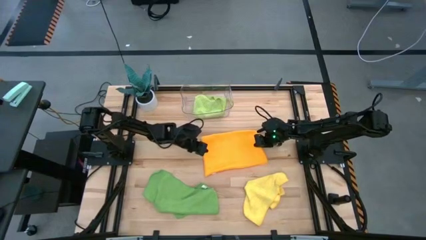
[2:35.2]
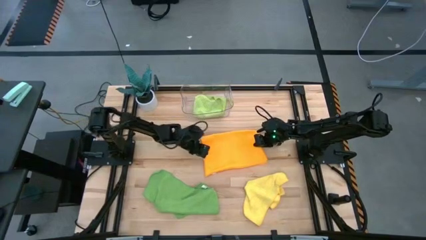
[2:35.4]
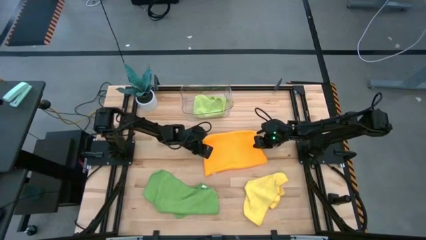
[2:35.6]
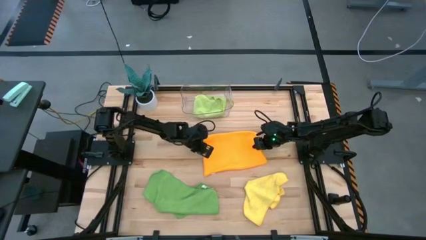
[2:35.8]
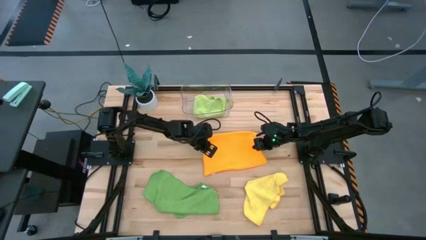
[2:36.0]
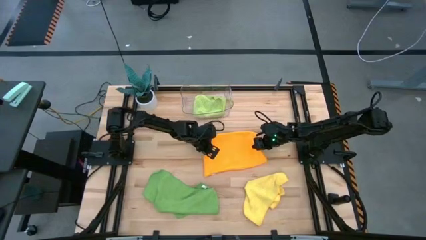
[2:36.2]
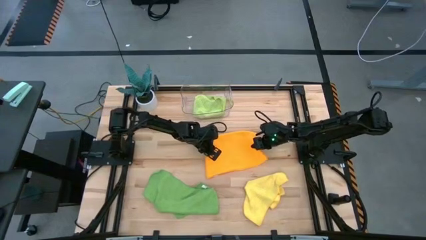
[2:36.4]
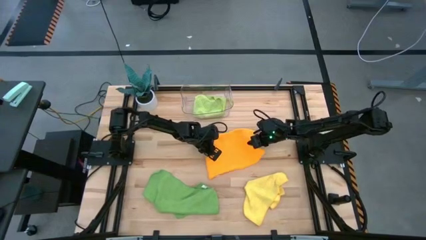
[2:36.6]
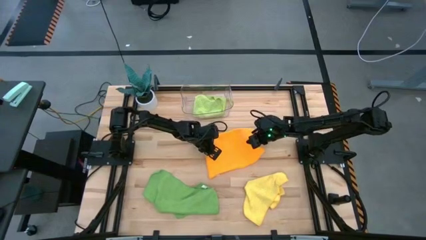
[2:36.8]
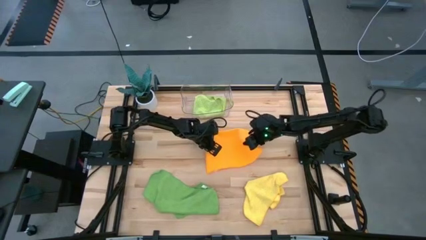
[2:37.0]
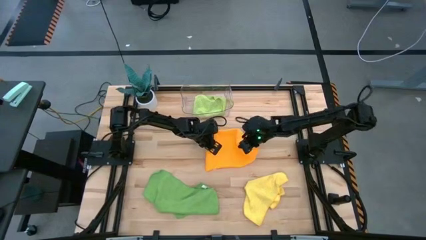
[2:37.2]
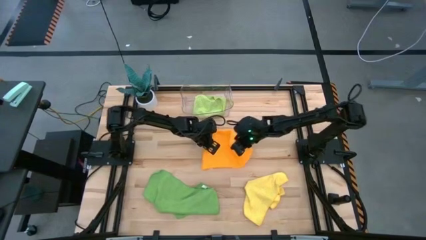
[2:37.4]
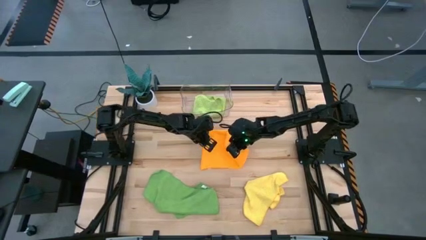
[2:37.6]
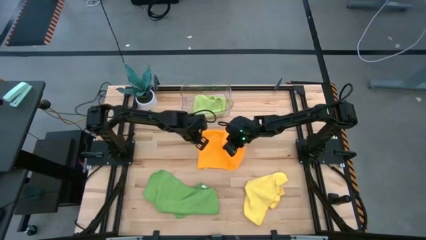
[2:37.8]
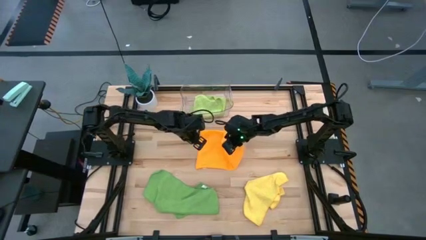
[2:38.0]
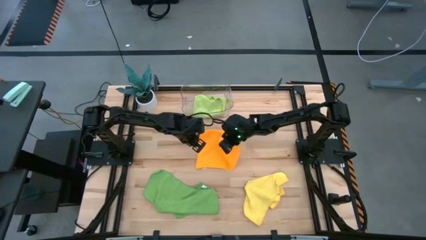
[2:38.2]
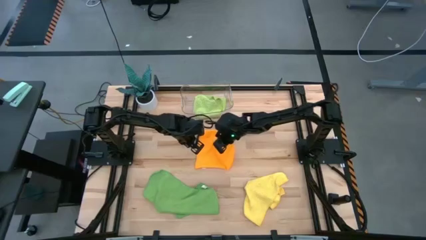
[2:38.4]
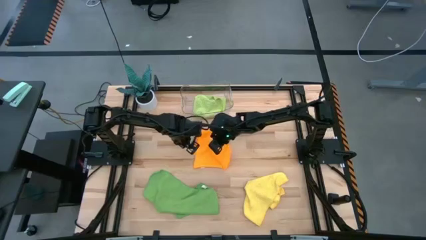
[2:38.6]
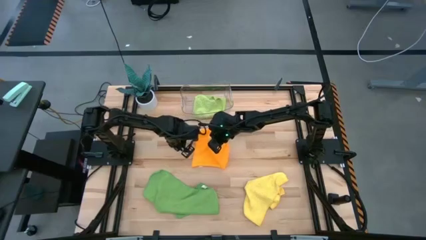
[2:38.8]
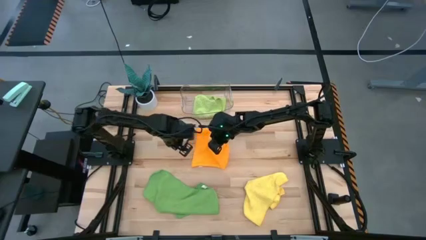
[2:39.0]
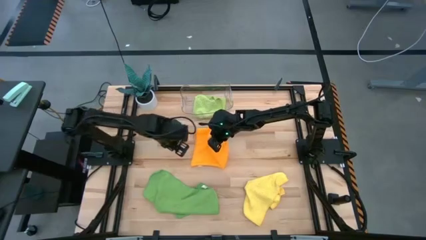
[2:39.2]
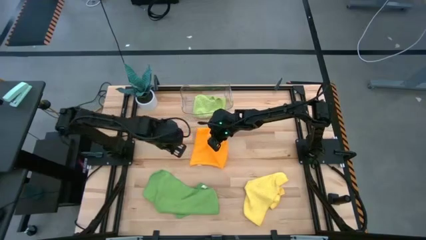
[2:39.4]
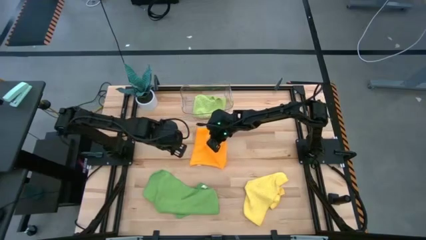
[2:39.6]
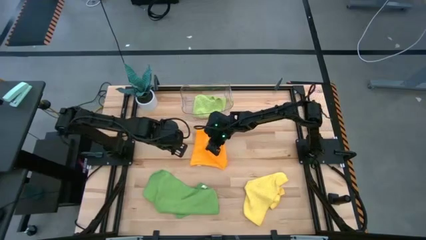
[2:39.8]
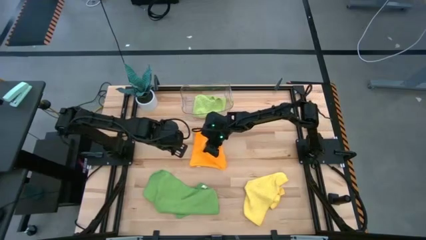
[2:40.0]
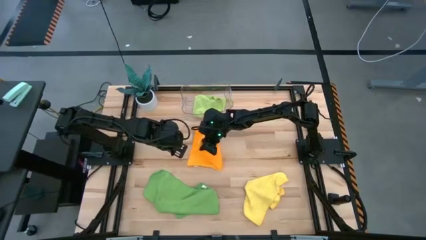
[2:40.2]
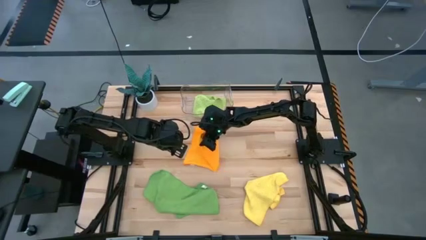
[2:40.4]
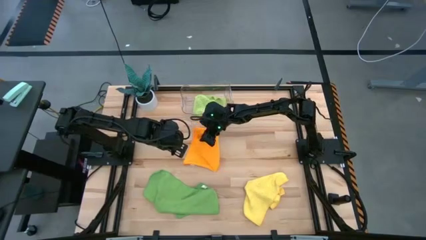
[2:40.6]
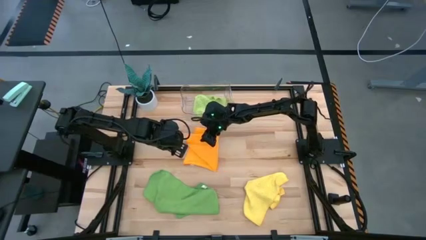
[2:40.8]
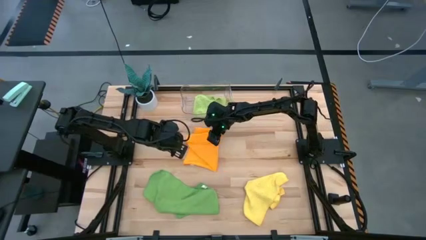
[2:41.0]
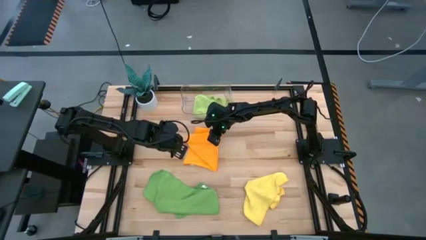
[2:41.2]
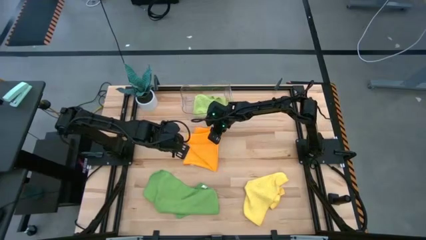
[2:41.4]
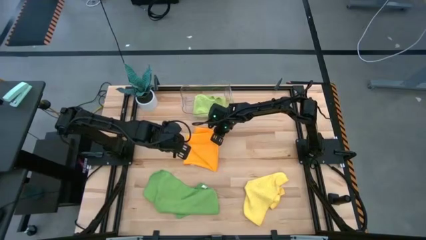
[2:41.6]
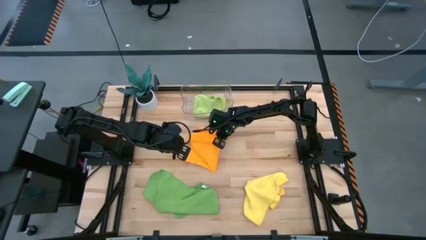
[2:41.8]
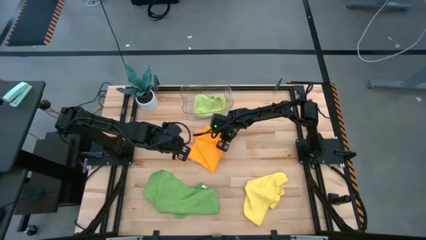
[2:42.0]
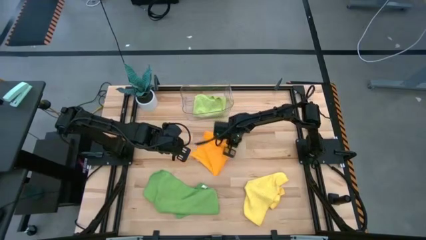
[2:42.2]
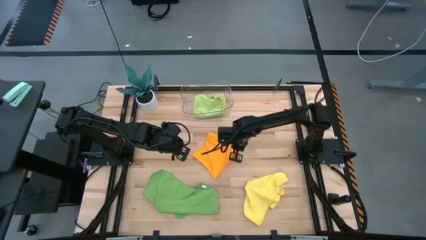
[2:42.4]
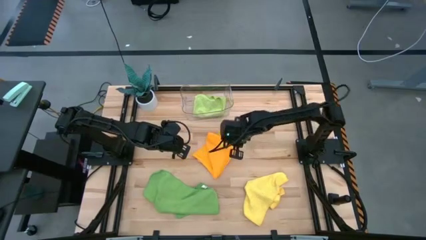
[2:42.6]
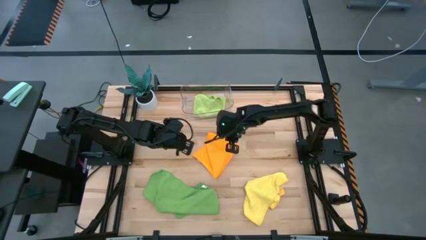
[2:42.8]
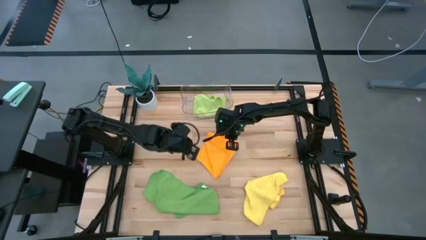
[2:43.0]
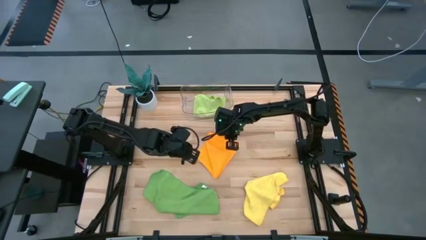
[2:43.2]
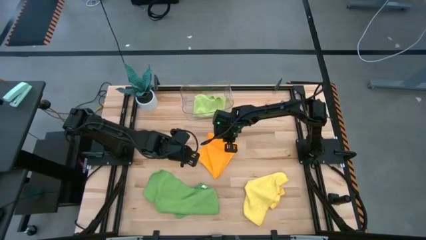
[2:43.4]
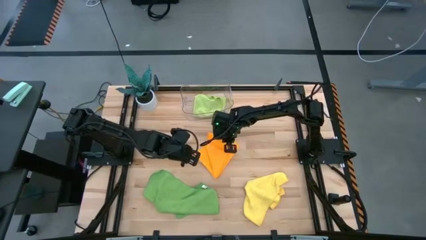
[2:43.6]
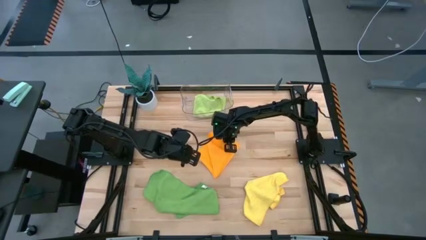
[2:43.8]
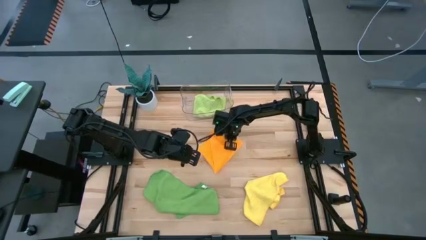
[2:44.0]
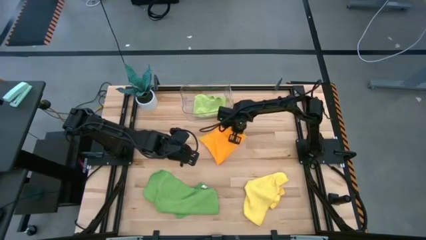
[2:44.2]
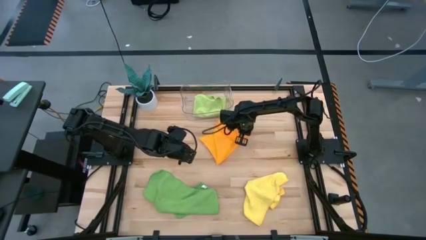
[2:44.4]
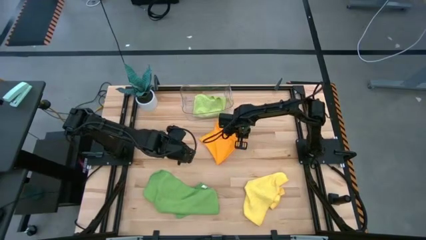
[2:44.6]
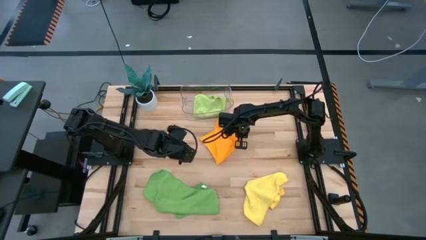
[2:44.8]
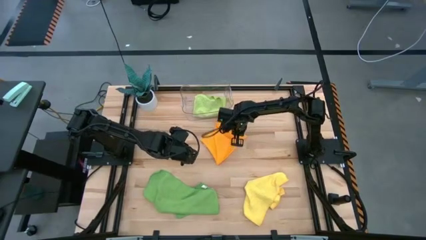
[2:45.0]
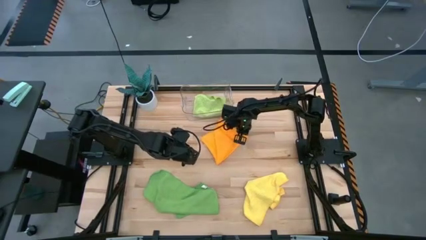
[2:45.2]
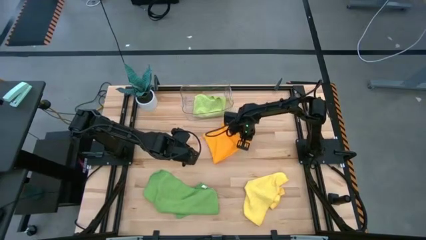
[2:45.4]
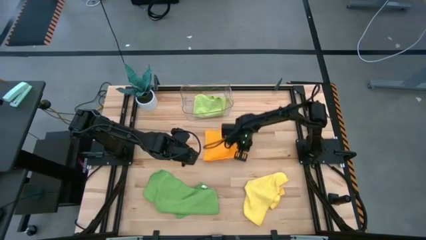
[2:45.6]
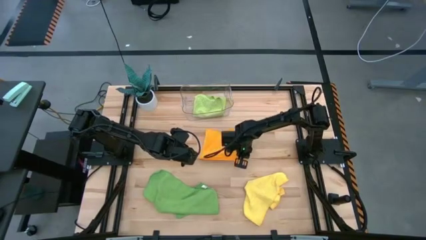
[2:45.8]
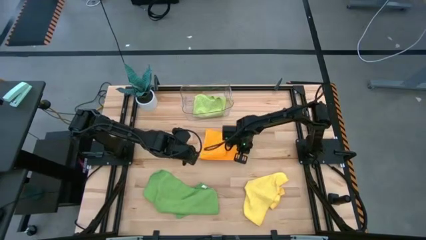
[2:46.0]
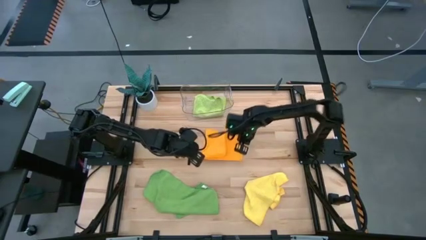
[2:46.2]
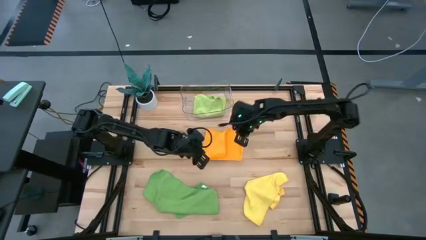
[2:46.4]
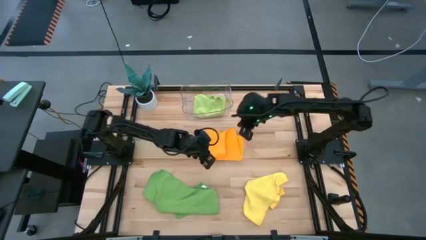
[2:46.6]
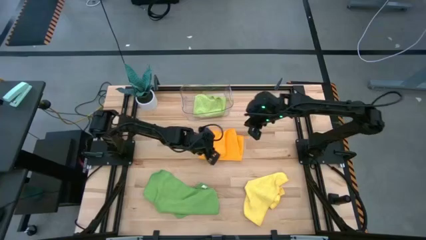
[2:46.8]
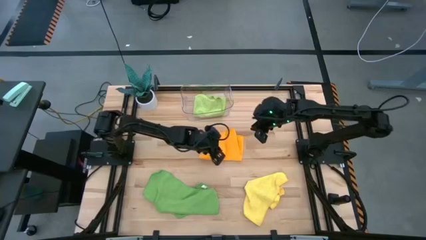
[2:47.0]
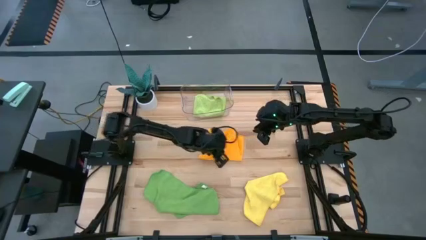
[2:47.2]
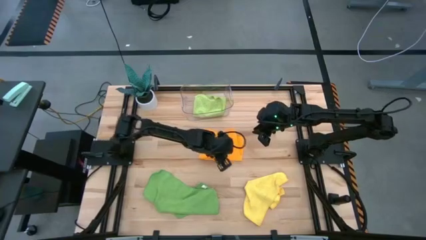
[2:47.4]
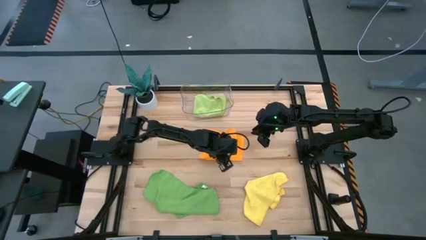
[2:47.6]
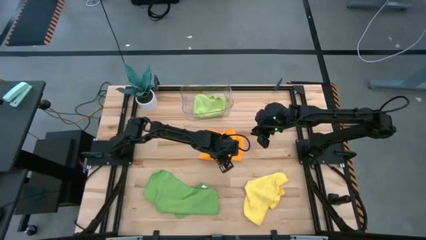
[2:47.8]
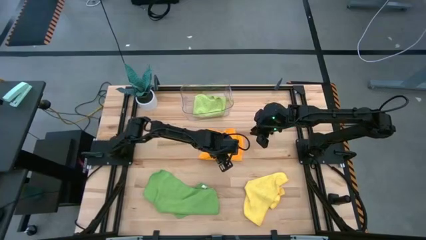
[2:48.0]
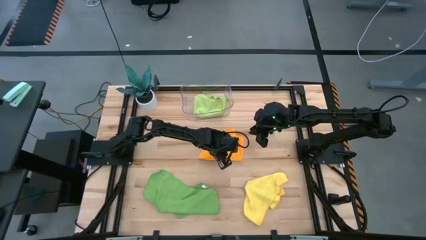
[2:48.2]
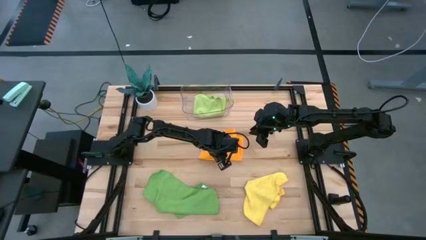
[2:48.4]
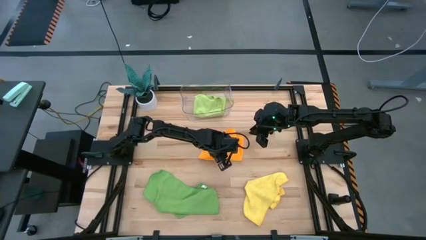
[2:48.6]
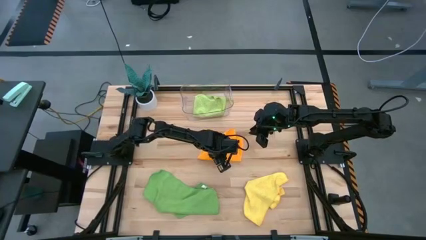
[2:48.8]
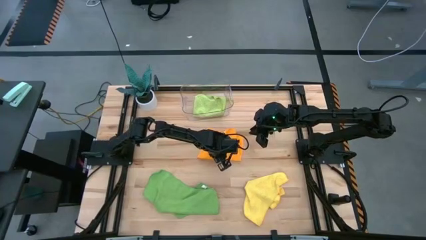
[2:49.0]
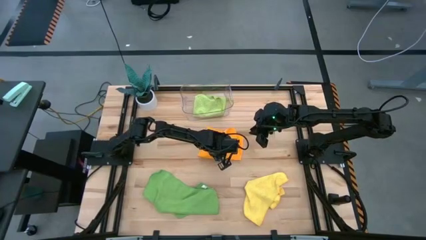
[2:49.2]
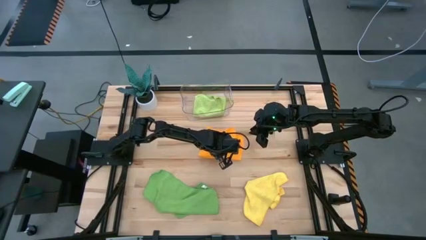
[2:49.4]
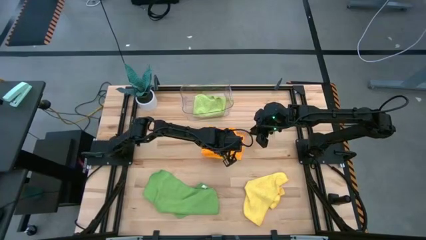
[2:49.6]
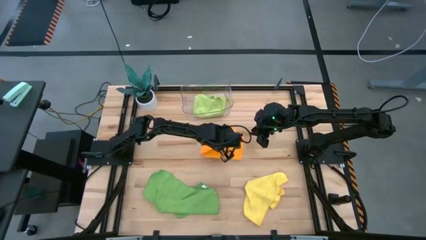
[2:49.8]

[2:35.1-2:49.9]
Task: Fold microfiber towels
Fold the orange microfiber cloth
